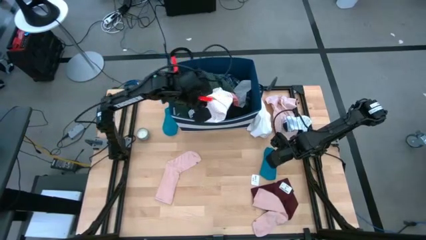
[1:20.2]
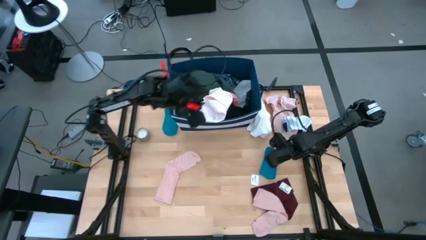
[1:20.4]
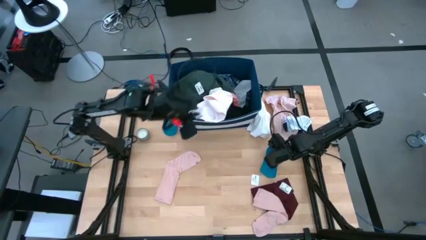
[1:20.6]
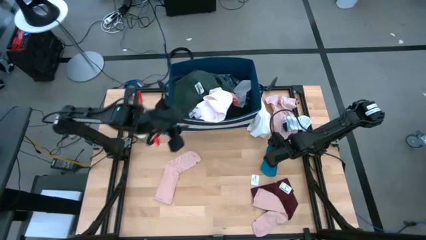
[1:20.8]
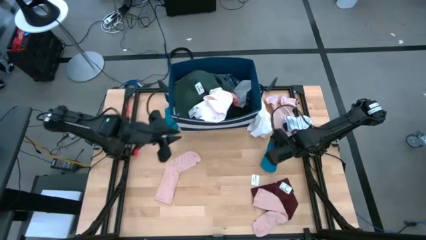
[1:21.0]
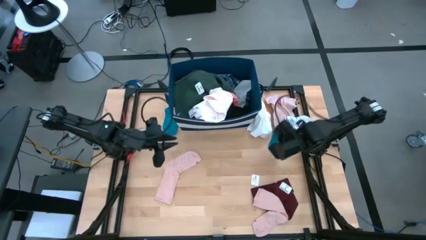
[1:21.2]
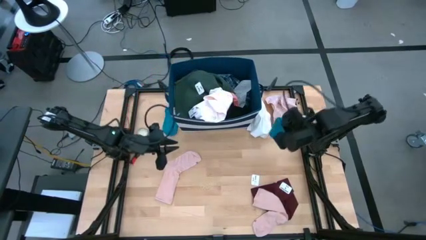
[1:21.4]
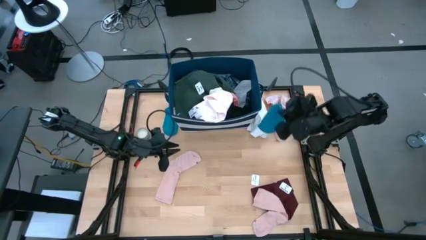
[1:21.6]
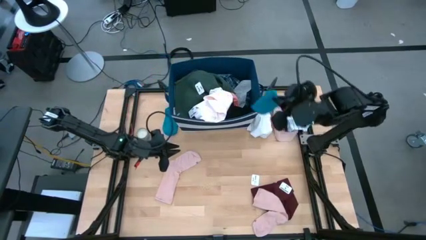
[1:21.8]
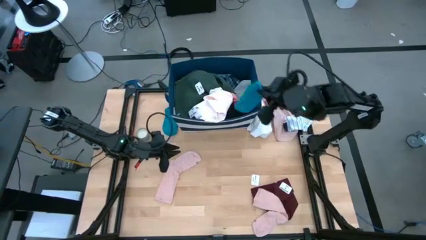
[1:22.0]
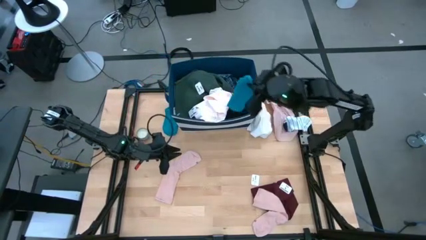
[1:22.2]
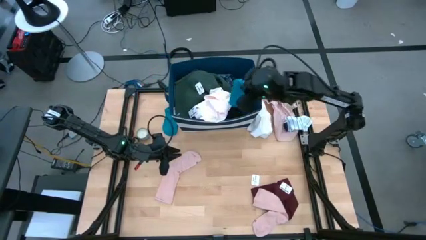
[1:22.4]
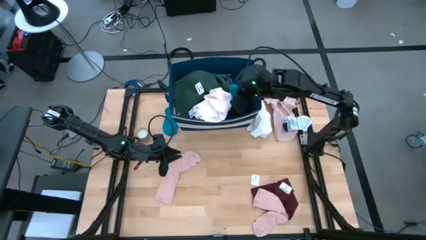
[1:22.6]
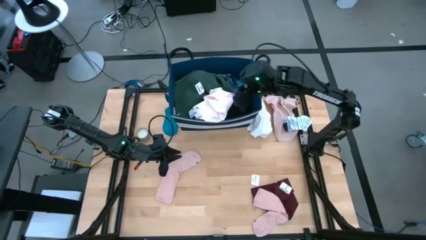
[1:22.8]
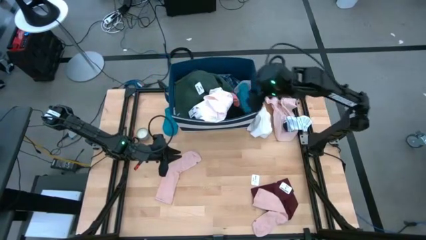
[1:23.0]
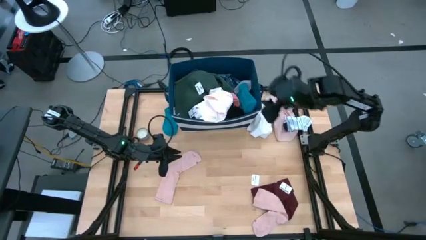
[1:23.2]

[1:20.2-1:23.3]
Task: Sort clothes
Put the blue sock into the blue laundry bin

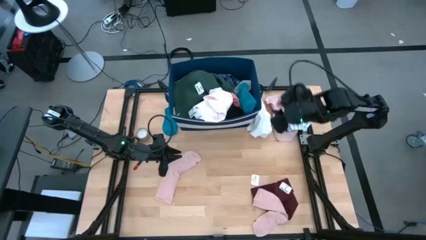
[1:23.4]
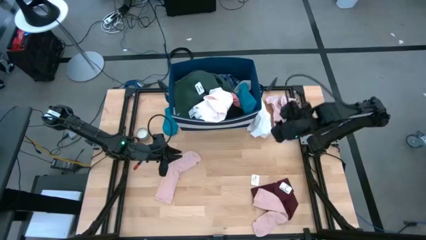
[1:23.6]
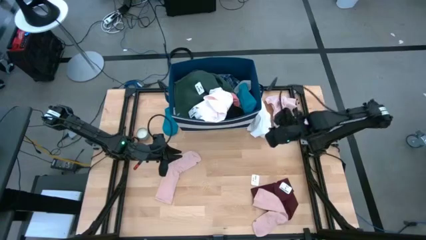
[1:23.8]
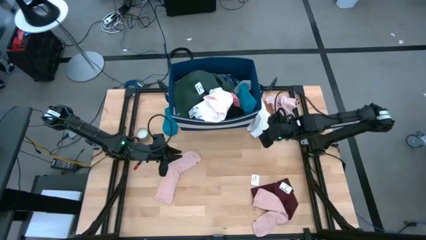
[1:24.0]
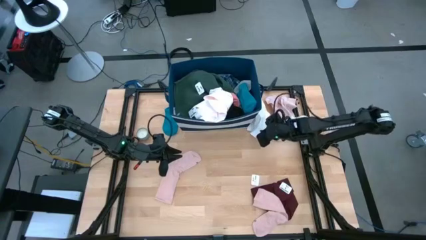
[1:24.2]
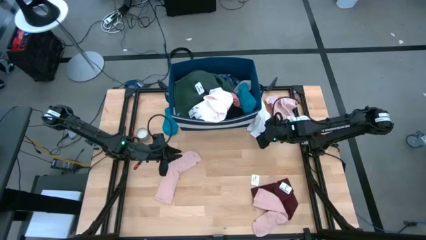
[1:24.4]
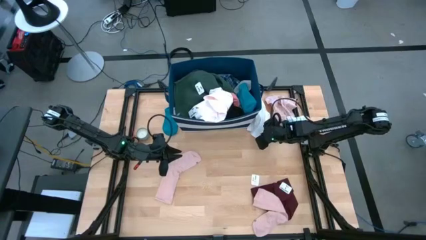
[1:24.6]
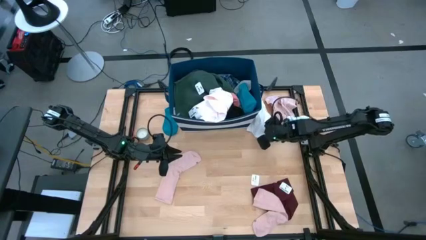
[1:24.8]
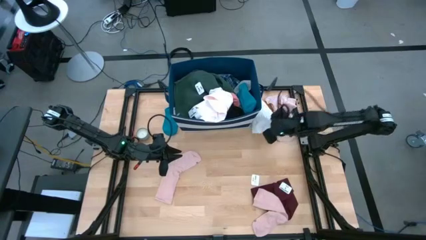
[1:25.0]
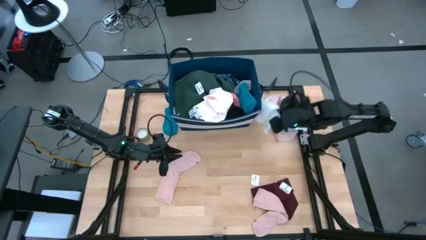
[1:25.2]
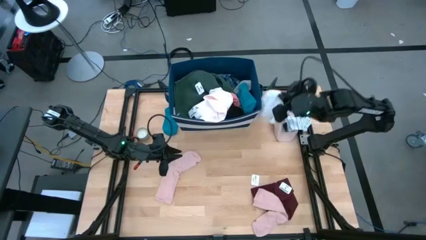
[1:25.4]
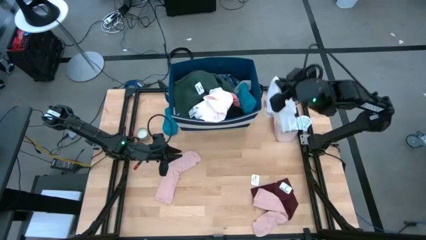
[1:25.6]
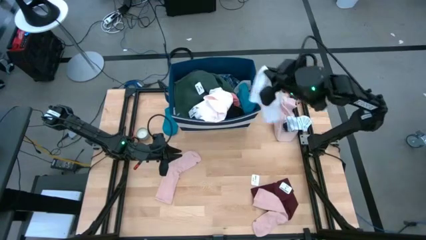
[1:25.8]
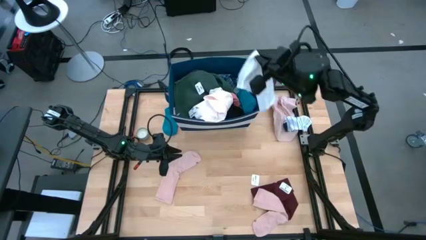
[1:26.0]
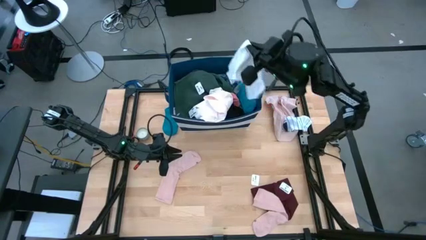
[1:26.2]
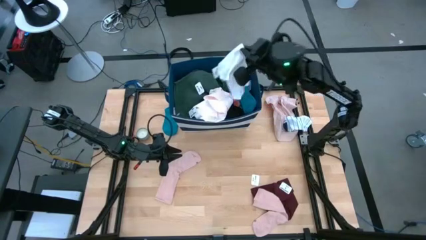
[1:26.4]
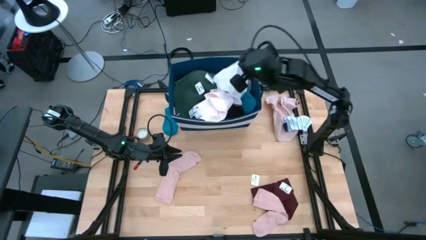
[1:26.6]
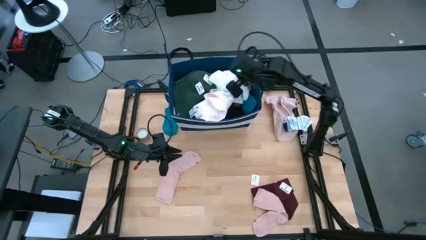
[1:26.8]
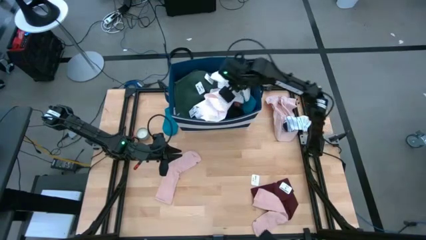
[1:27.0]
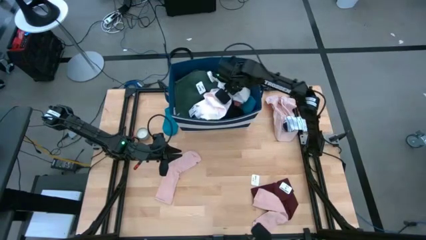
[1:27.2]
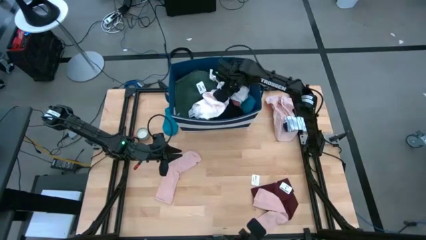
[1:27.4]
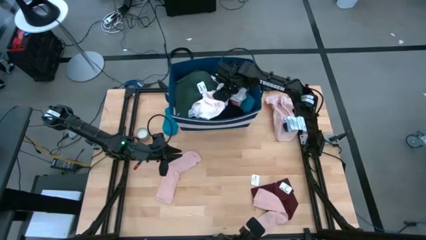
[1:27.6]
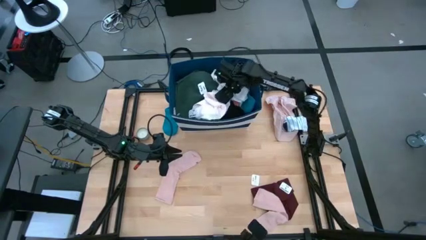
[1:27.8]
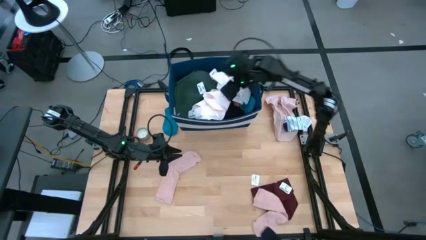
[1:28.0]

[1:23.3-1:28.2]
Put the white underwear into the blue laundry bin

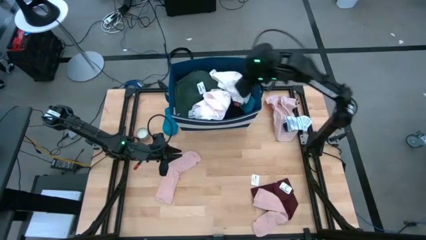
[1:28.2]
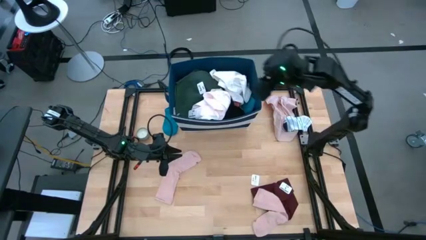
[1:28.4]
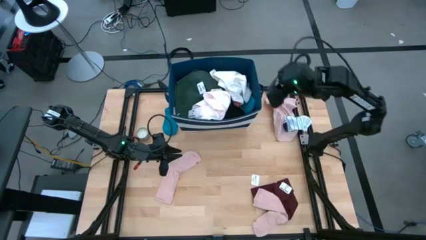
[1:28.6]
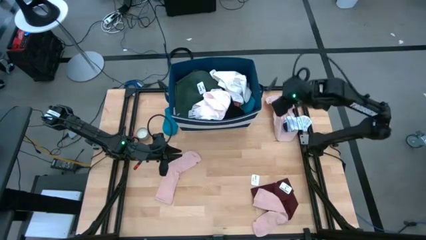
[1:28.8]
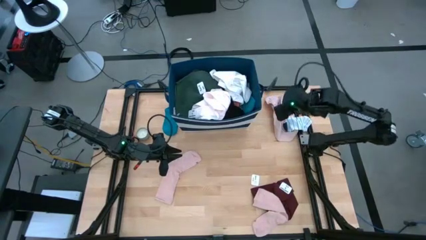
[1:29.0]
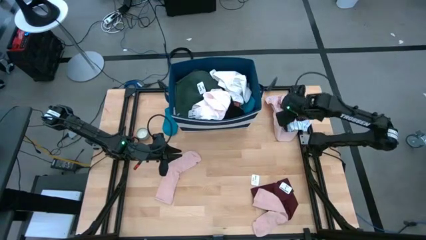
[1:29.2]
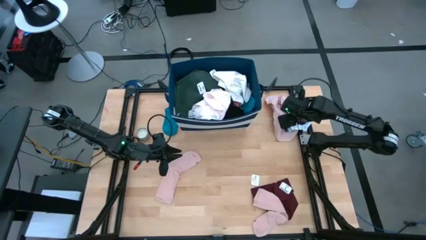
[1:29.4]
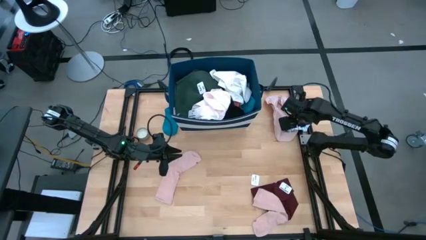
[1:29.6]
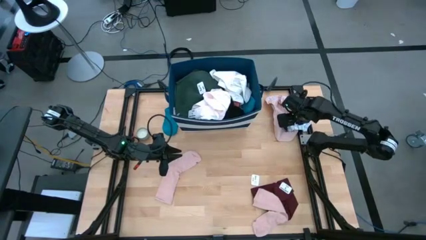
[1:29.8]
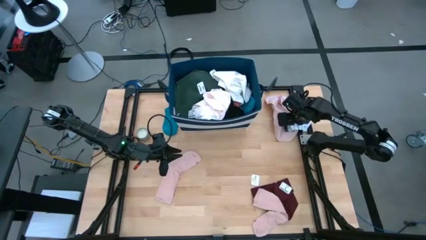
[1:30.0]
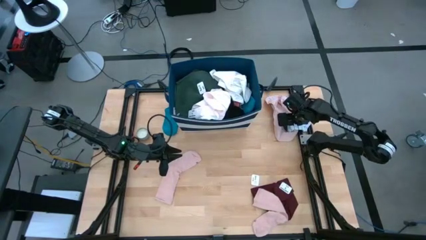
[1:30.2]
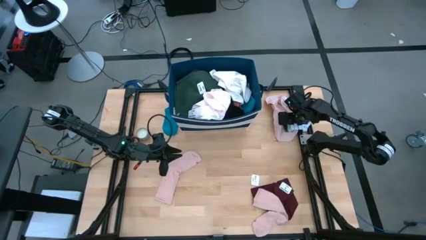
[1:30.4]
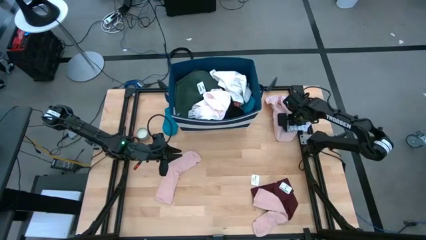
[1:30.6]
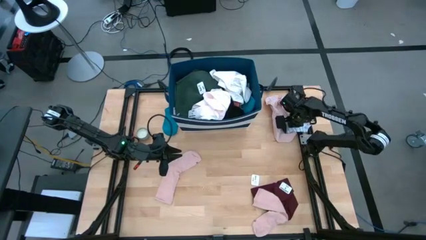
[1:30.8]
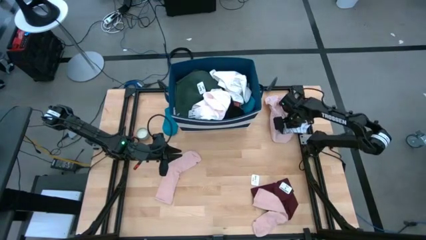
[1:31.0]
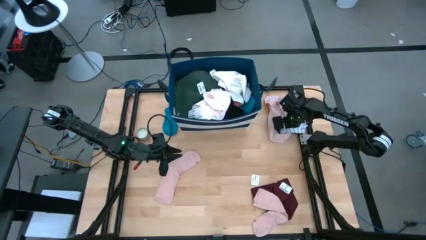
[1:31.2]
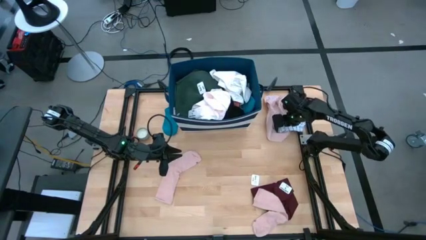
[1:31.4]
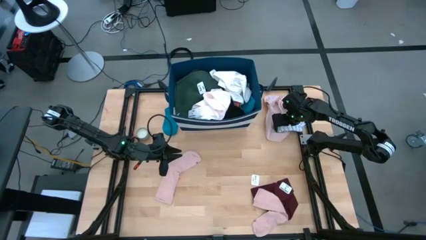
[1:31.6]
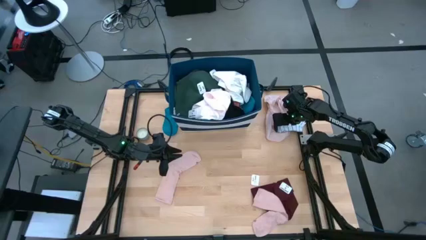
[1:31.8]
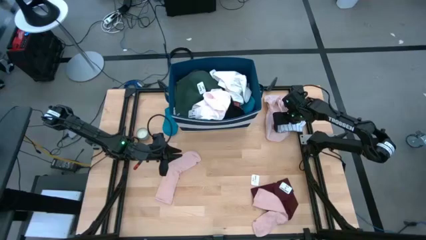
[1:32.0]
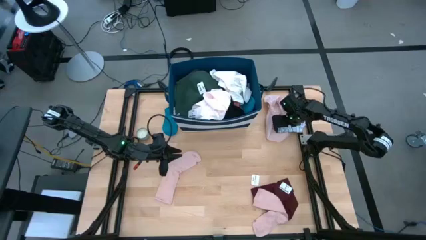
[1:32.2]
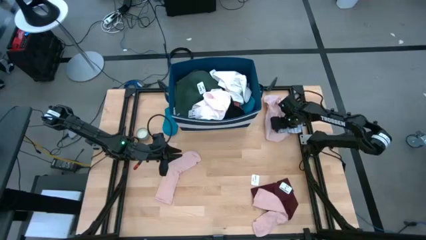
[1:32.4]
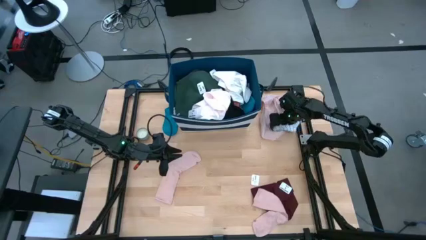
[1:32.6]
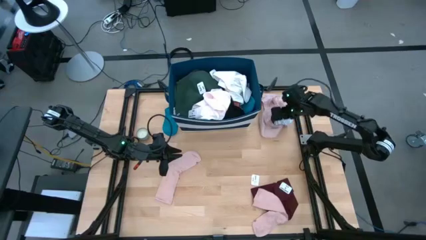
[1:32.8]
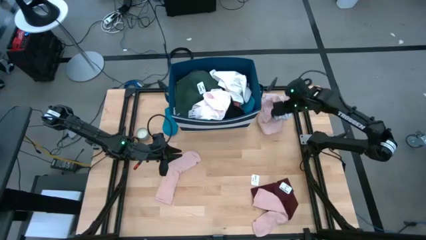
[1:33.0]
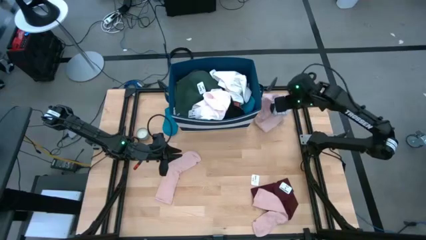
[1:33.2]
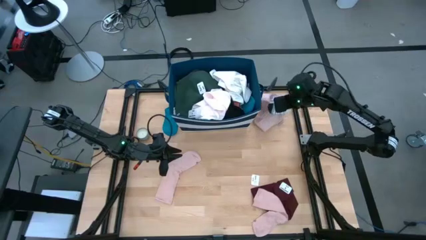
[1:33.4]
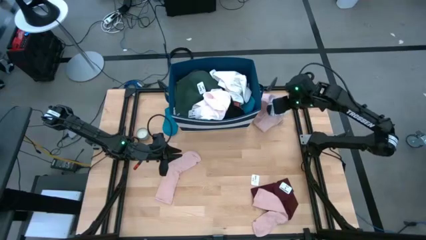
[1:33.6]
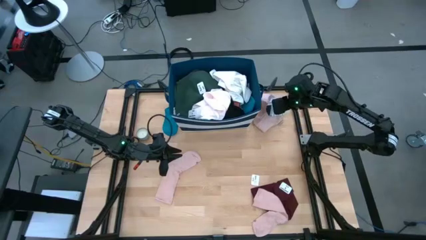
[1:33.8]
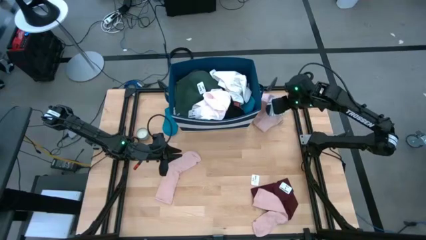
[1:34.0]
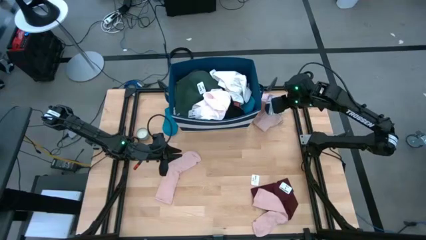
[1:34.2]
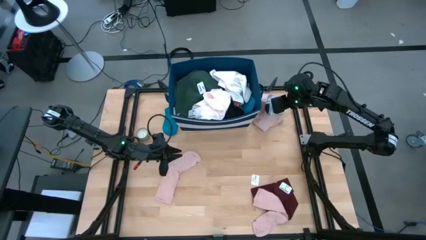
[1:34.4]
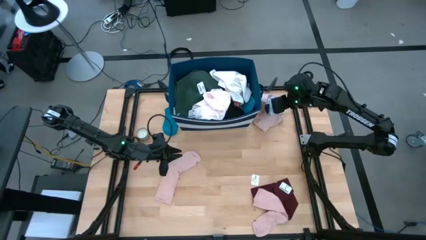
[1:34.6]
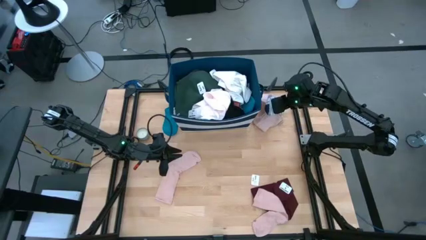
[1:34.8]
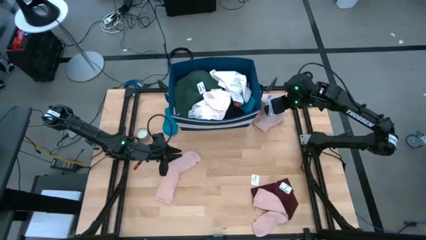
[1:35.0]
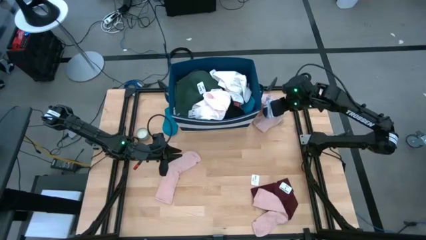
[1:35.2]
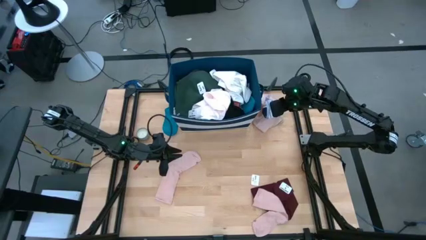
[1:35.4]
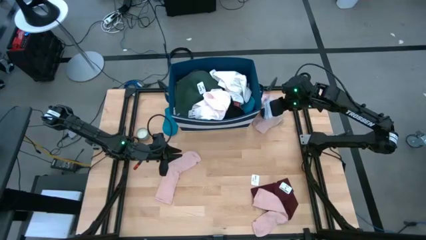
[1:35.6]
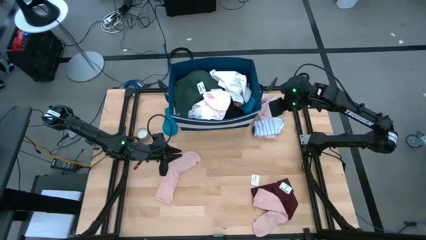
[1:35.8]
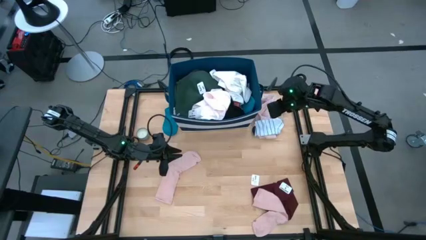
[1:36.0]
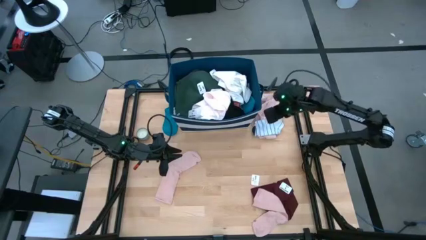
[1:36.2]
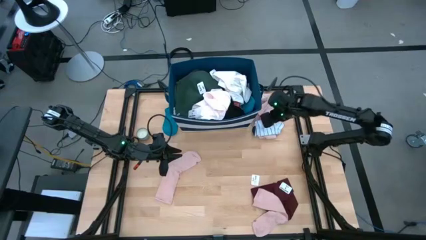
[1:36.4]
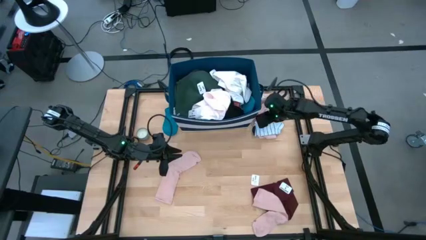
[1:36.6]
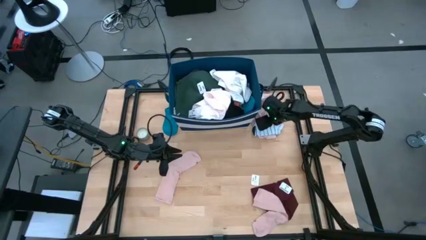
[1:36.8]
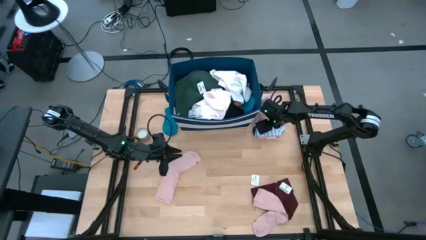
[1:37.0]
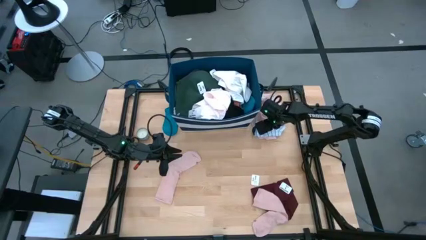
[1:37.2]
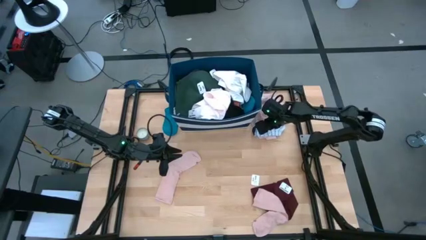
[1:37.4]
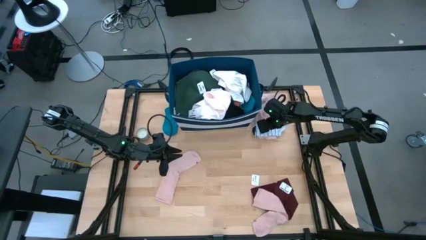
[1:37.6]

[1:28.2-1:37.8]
Put the white sock into the blue laundry bin
